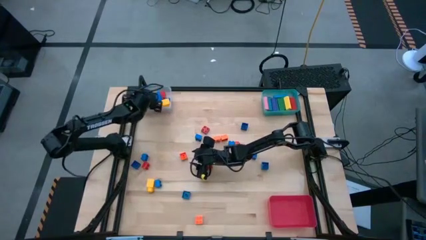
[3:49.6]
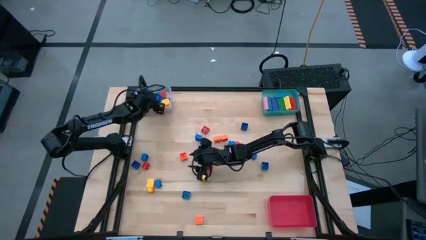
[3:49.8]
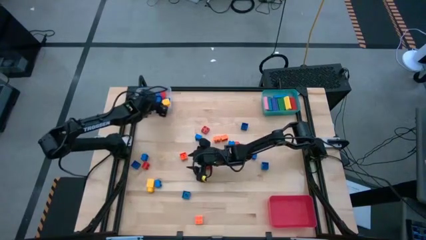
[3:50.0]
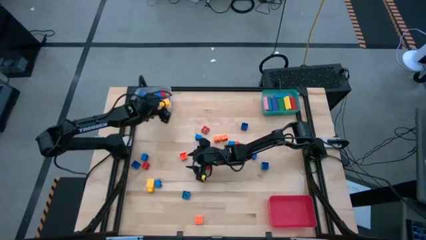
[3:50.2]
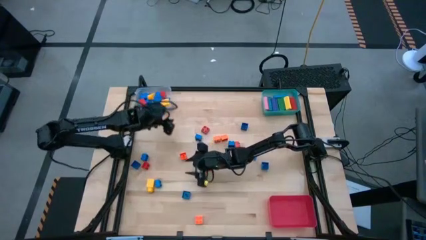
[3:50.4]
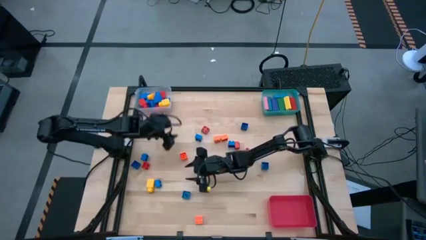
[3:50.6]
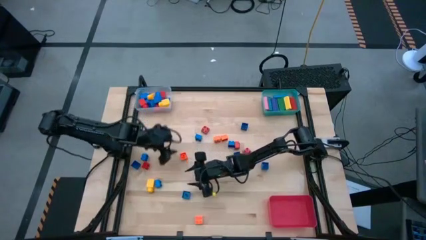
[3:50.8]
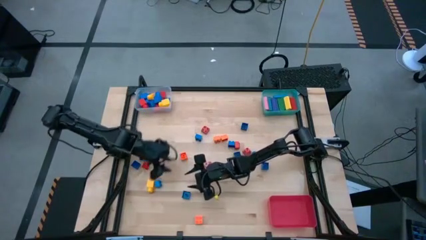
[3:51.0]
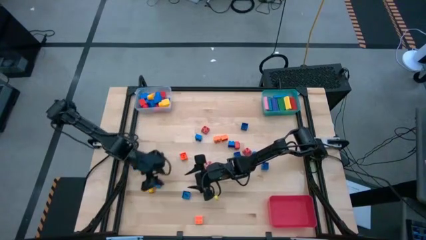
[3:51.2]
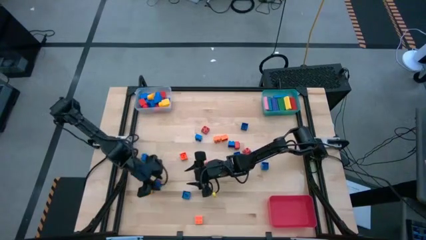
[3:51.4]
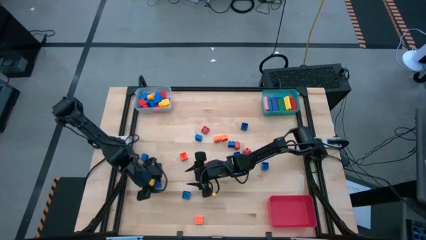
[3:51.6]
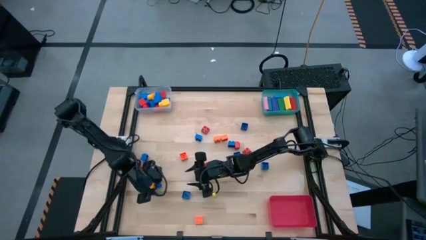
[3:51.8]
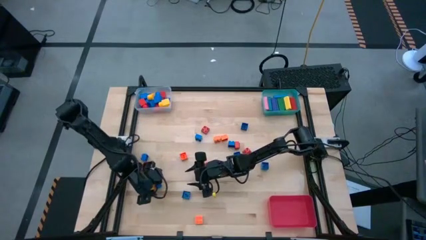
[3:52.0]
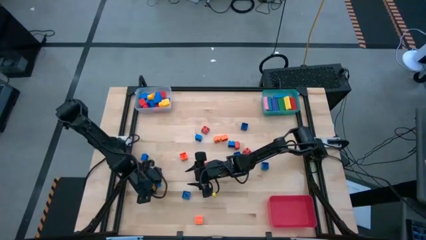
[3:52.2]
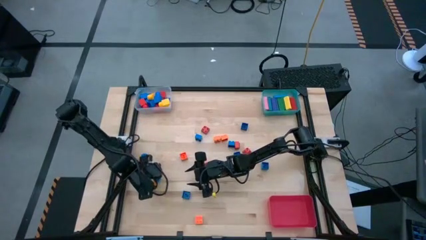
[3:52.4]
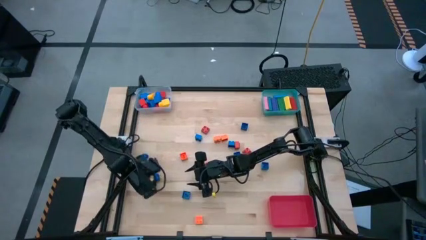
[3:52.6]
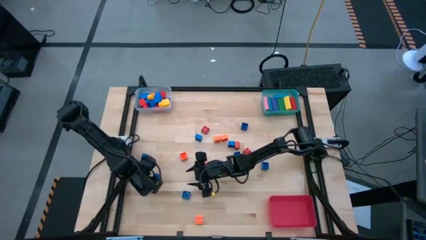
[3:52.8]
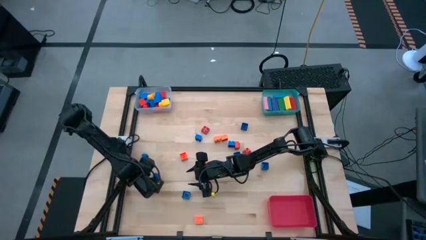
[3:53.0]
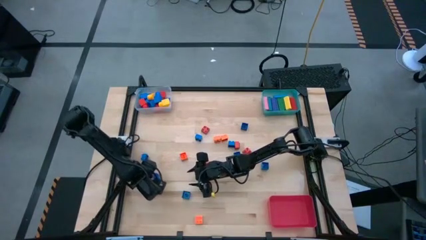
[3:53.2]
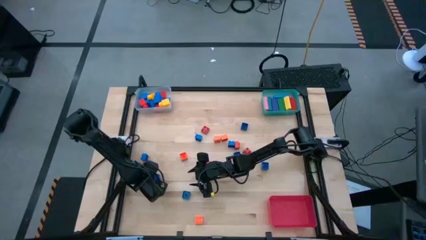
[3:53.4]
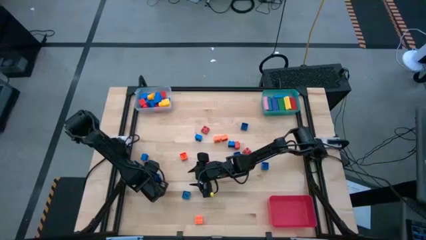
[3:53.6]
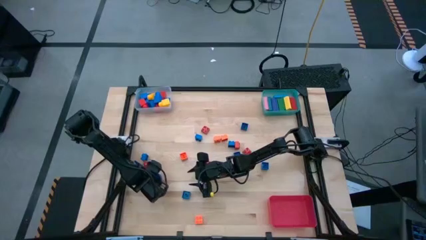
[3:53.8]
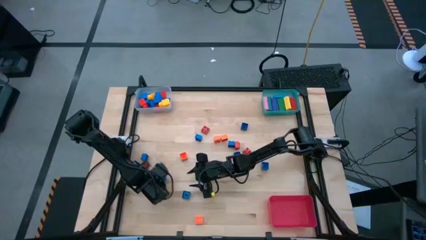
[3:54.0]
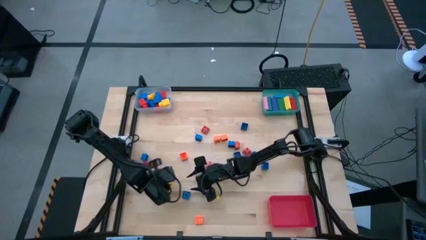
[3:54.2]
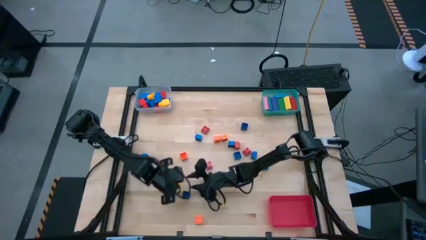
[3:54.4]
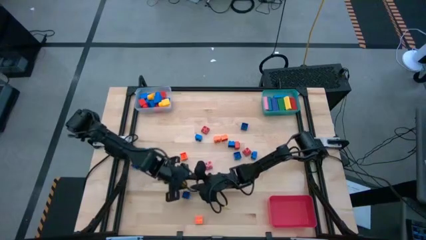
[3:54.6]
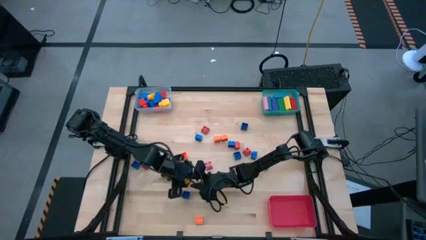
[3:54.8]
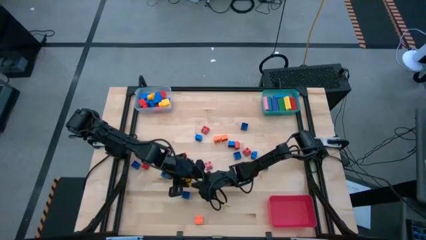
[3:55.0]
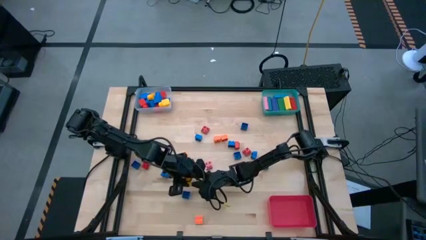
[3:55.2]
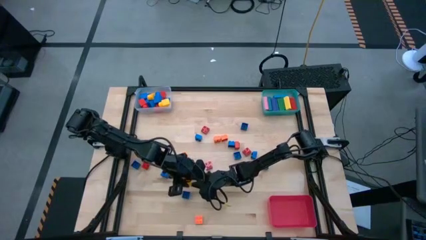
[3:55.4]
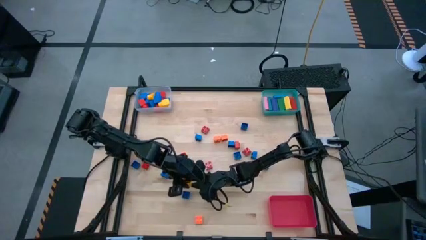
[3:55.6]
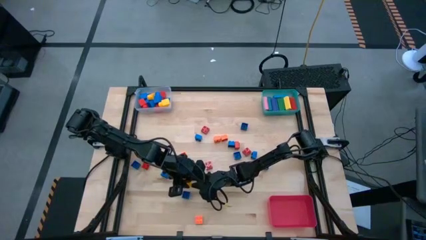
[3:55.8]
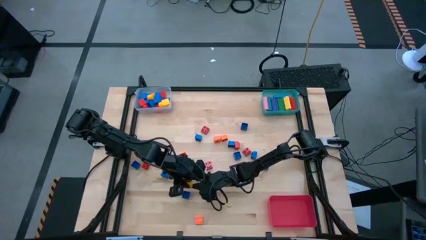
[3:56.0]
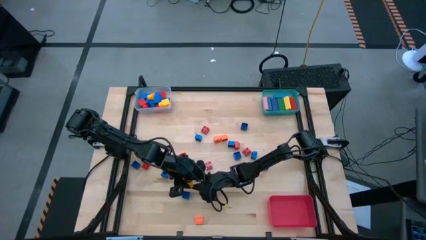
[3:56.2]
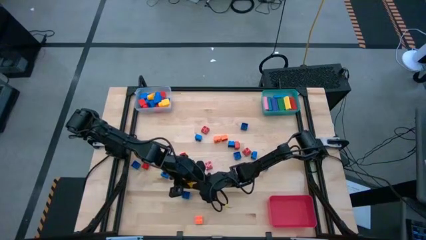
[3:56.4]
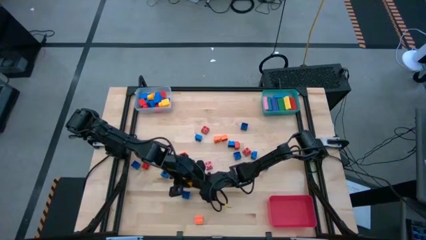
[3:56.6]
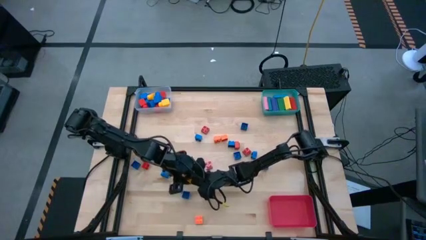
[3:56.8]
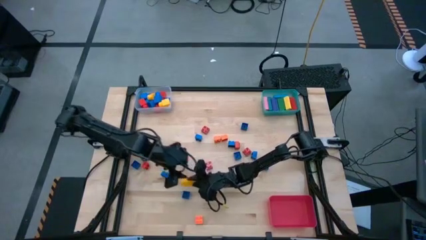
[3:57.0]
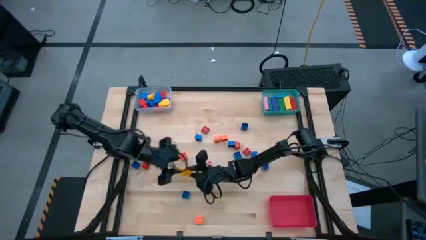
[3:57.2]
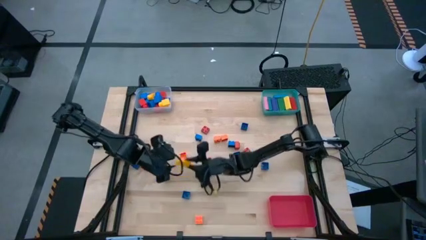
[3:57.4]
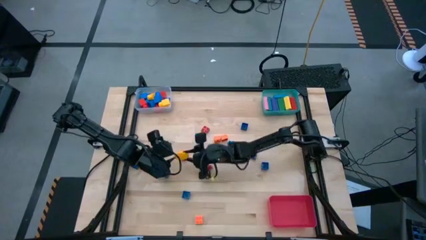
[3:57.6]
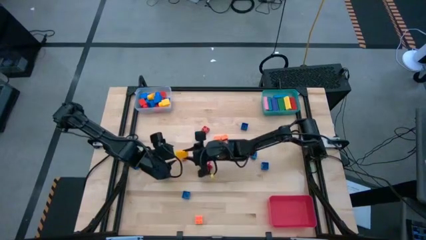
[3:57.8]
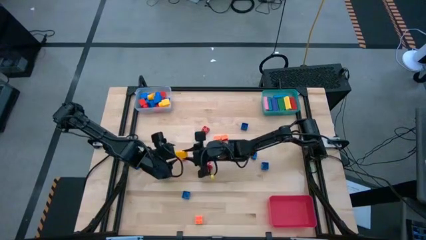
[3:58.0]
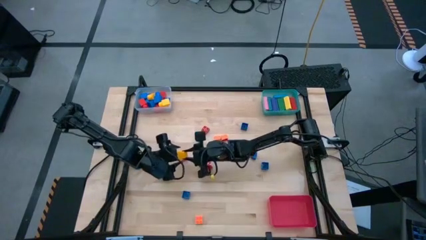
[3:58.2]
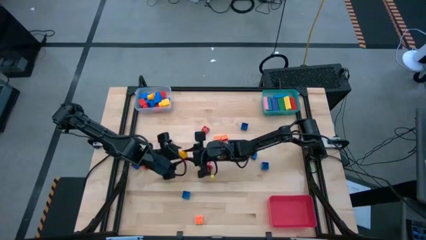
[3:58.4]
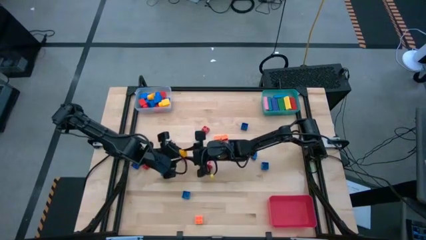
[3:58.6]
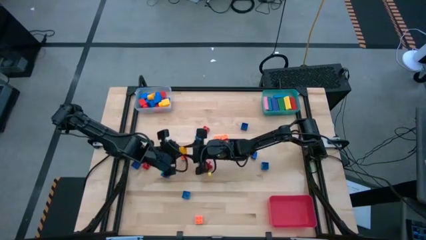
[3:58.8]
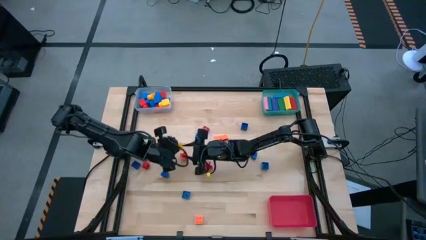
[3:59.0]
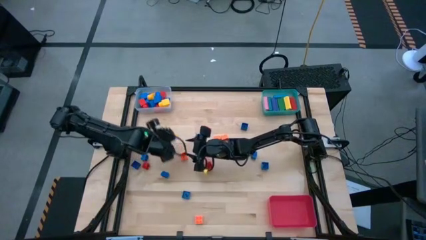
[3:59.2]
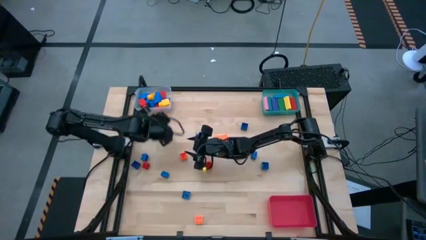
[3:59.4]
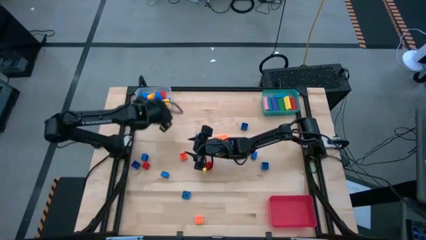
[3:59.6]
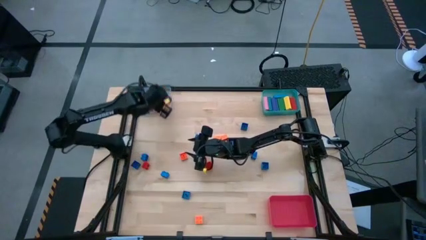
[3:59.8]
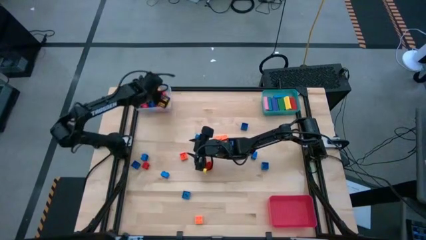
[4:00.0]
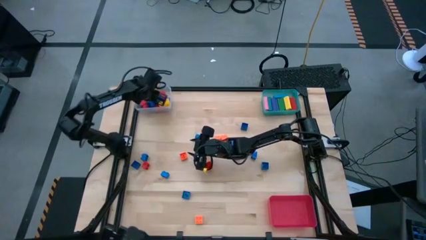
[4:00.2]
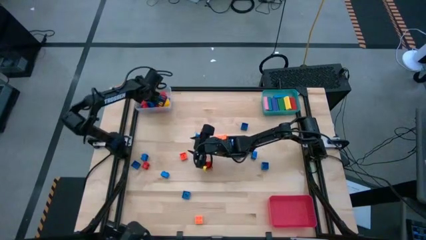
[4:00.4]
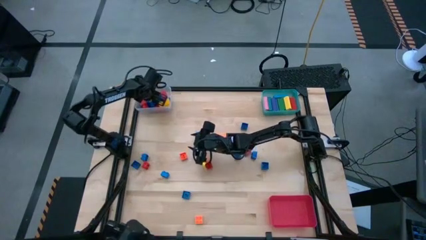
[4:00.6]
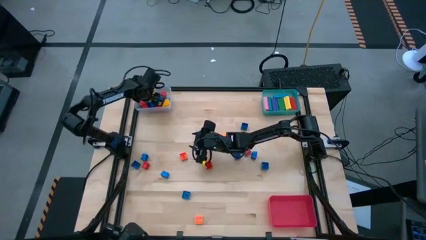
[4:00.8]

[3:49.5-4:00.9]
Task: Sort blocks by size
Put the big yellow game piece into the transparent bin

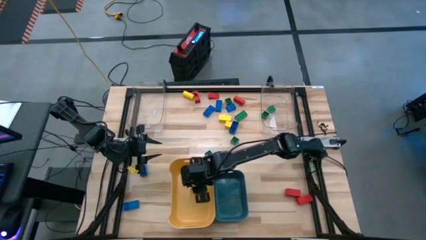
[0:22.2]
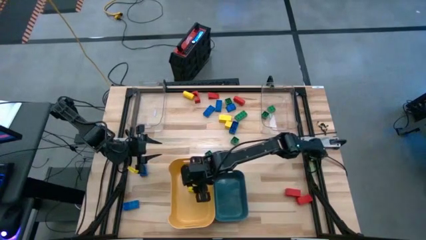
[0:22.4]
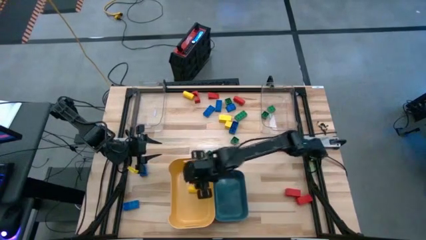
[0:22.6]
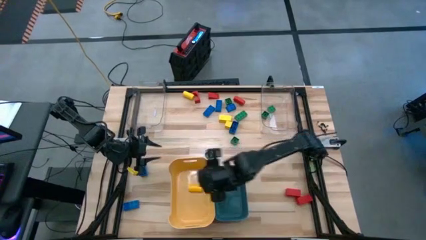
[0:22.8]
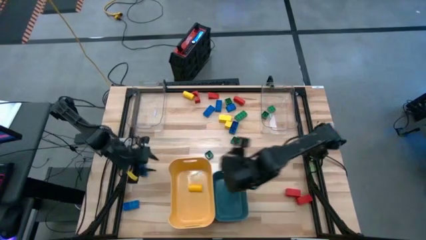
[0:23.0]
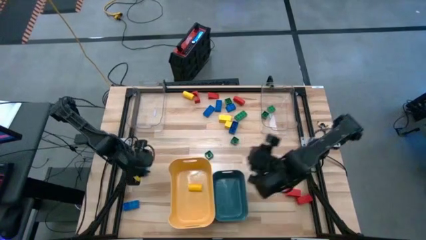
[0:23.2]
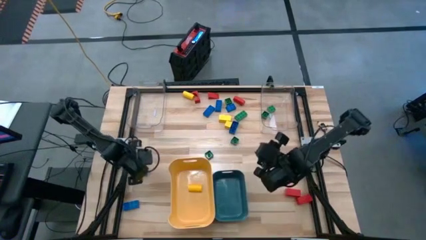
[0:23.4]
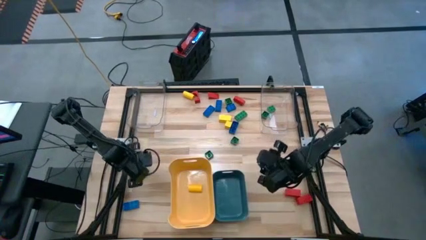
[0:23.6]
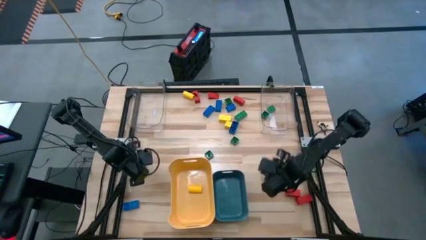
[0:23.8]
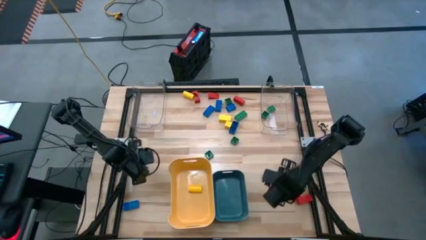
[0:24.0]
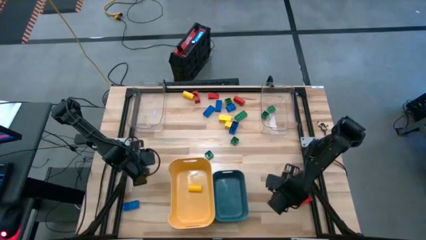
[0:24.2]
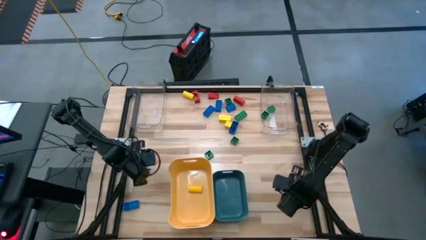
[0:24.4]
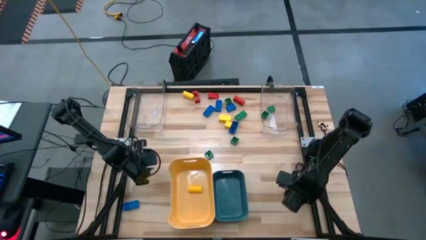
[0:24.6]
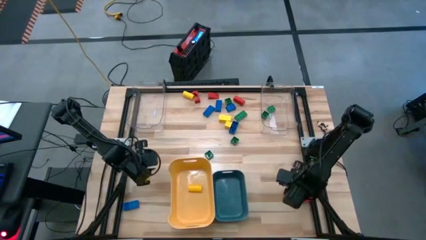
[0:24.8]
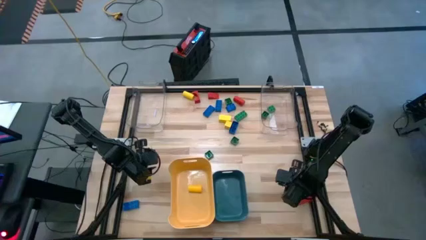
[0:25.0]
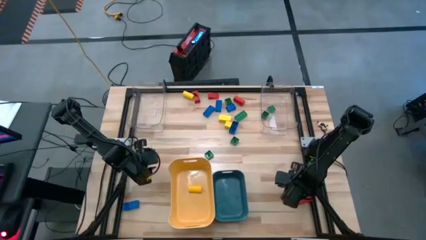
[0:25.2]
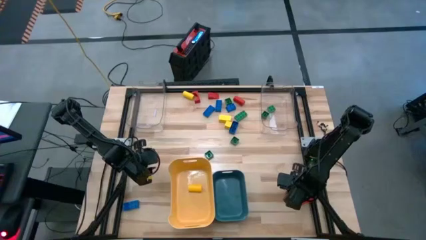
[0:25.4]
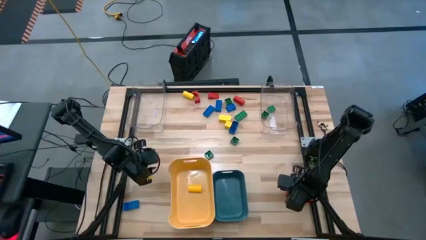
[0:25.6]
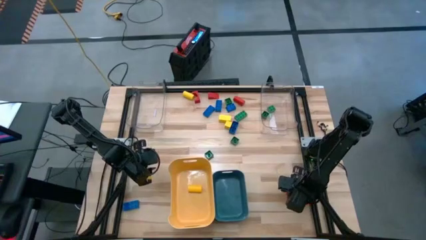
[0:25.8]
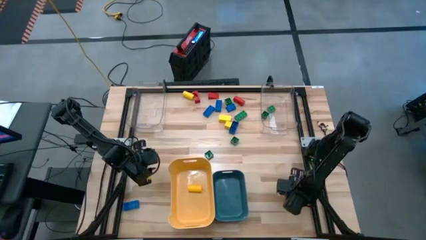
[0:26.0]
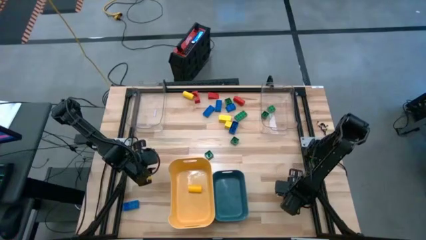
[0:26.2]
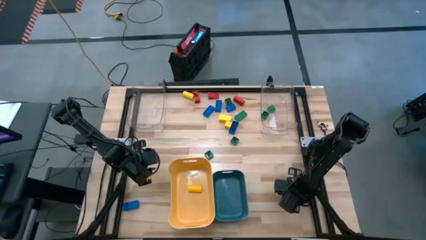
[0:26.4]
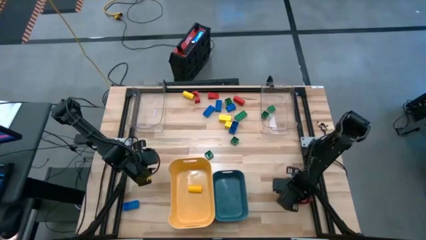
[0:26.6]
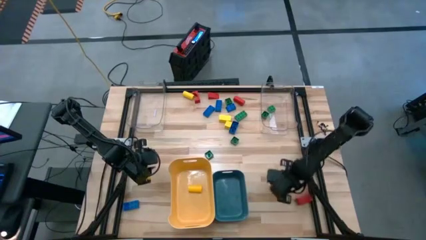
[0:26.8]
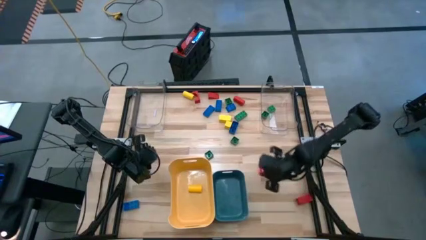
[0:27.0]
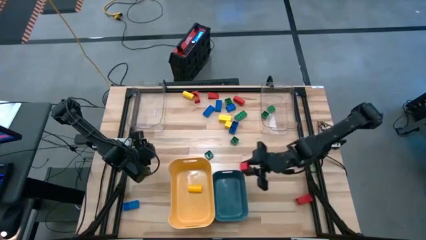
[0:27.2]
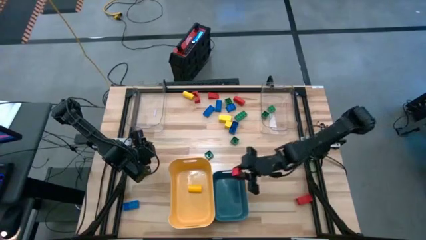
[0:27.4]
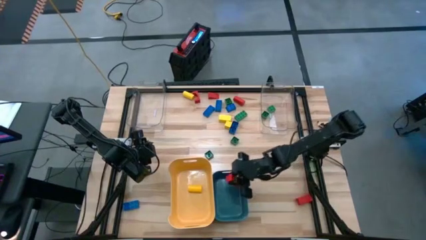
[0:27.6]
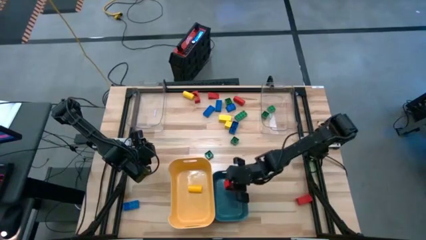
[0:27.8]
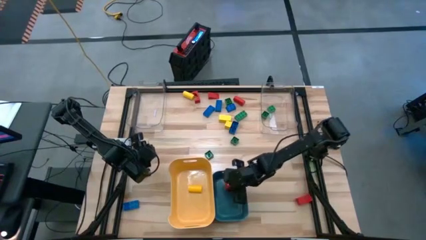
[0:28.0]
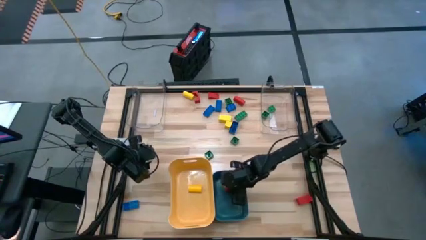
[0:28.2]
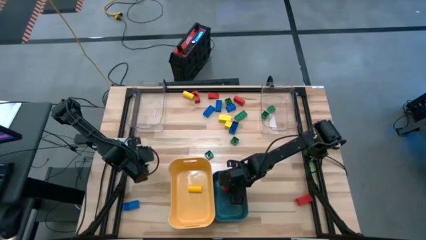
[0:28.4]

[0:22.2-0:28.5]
Task: Sort blocks
Put the red block into the blue bin
